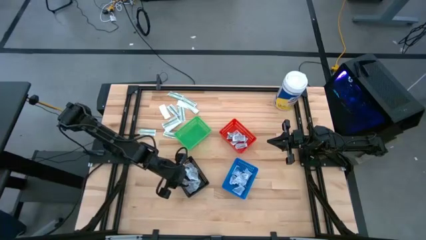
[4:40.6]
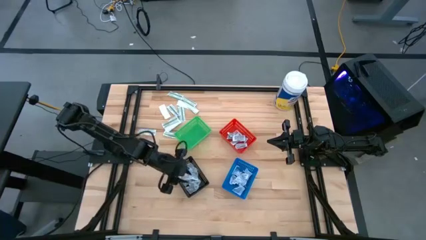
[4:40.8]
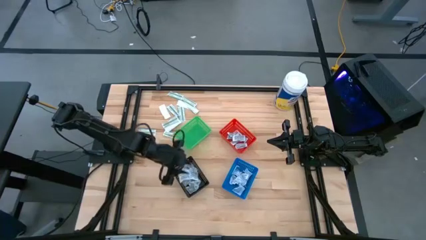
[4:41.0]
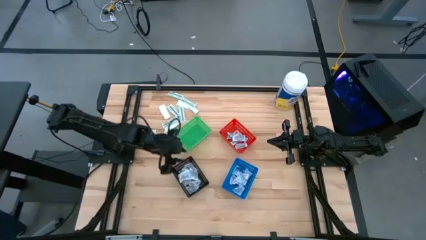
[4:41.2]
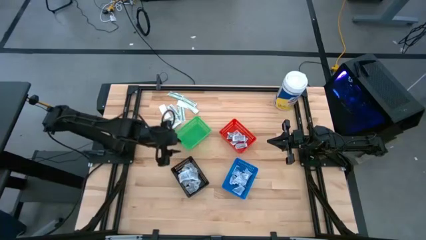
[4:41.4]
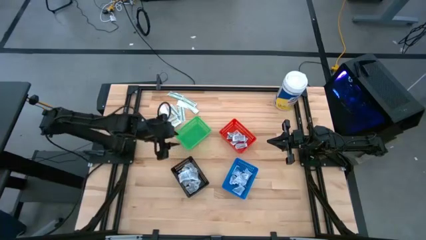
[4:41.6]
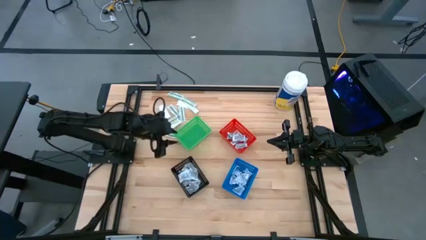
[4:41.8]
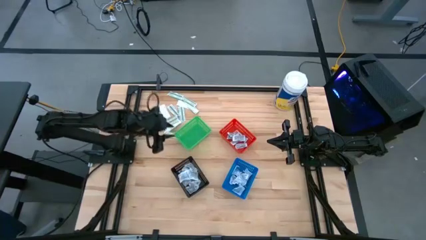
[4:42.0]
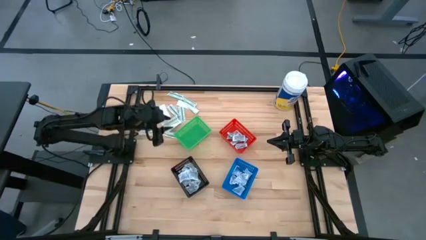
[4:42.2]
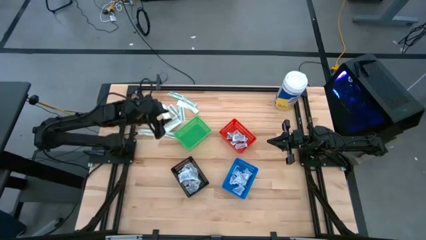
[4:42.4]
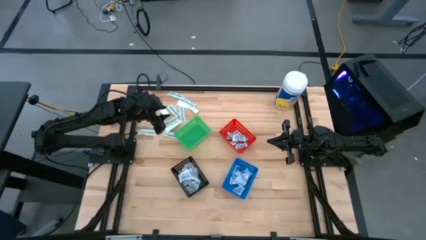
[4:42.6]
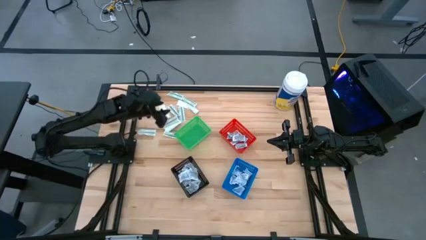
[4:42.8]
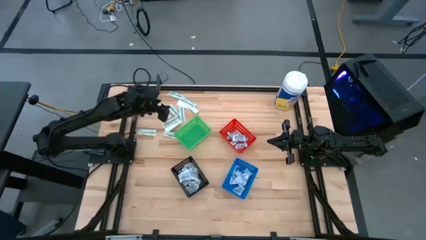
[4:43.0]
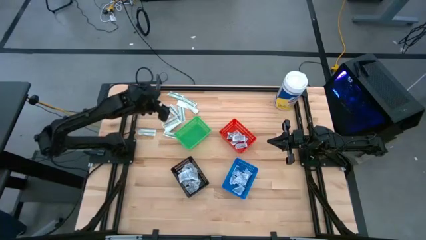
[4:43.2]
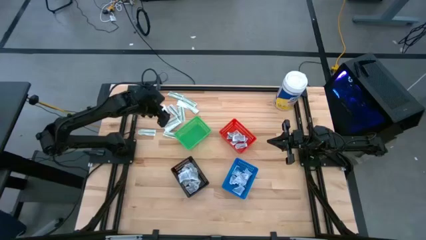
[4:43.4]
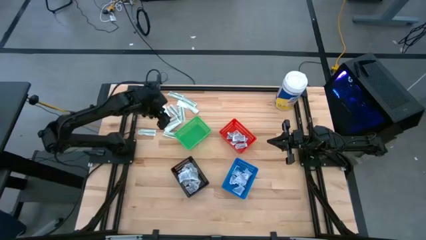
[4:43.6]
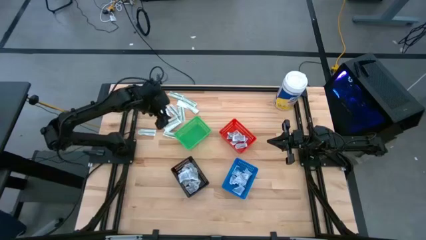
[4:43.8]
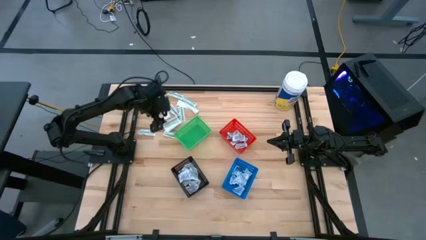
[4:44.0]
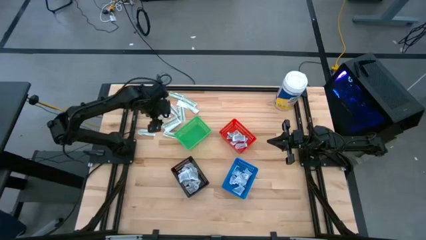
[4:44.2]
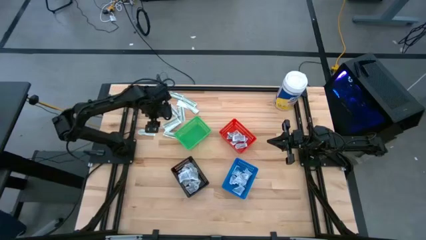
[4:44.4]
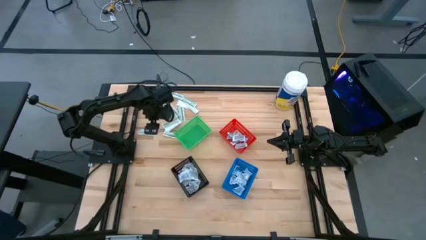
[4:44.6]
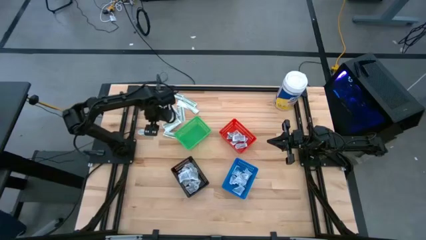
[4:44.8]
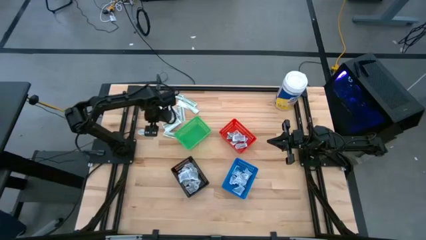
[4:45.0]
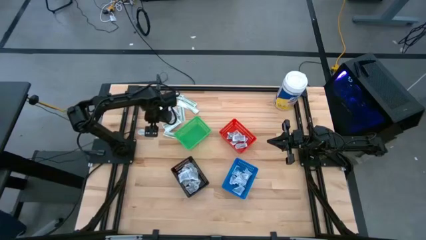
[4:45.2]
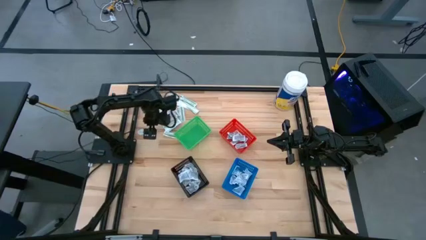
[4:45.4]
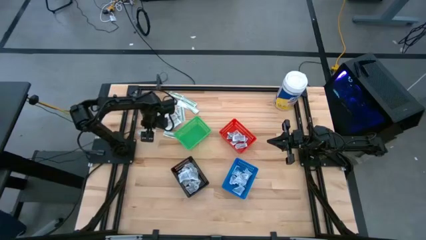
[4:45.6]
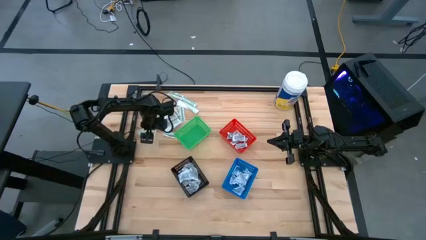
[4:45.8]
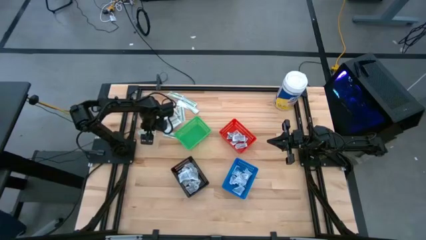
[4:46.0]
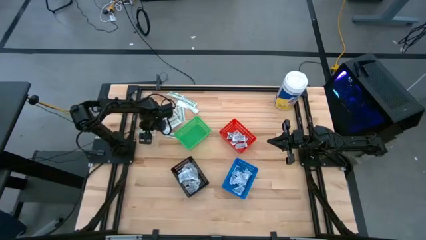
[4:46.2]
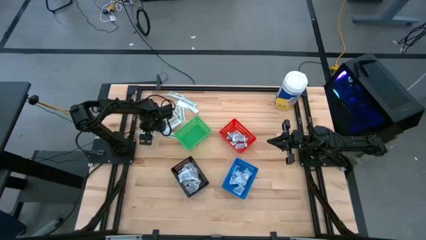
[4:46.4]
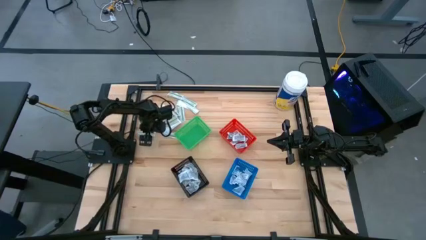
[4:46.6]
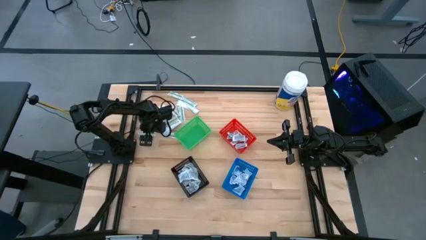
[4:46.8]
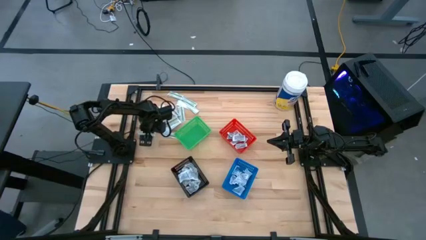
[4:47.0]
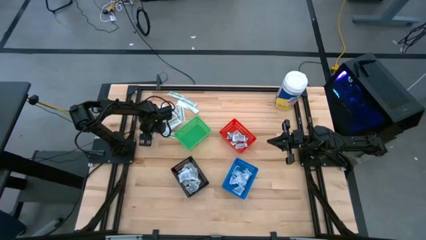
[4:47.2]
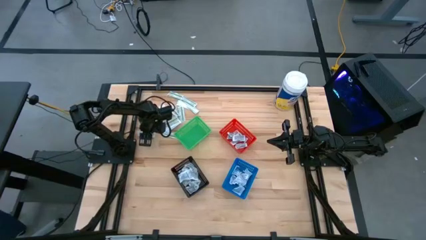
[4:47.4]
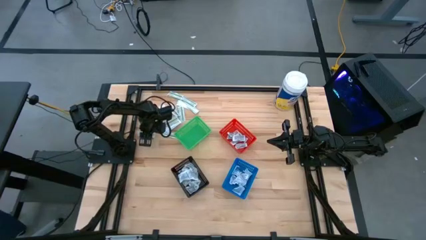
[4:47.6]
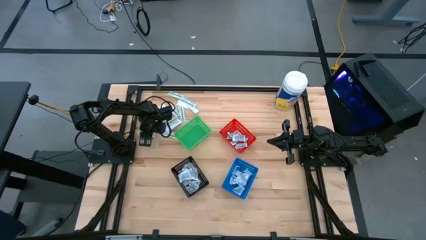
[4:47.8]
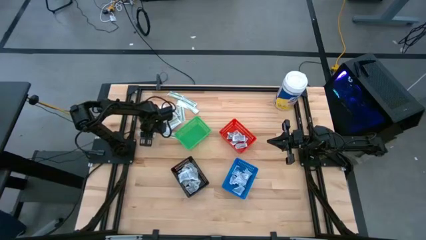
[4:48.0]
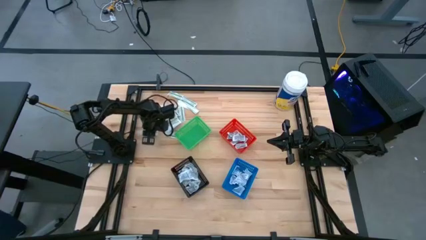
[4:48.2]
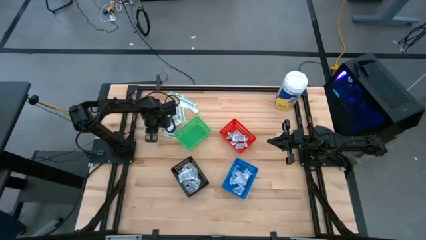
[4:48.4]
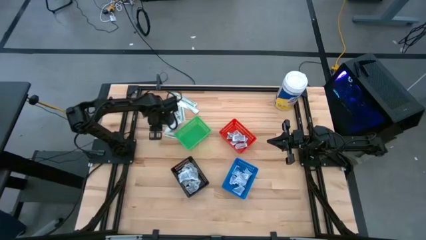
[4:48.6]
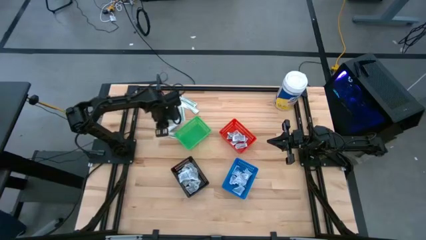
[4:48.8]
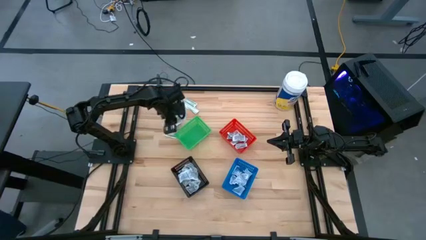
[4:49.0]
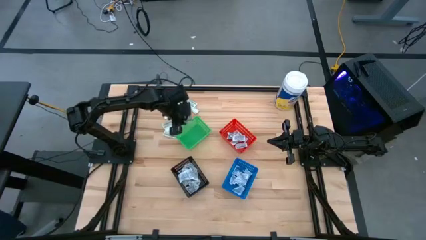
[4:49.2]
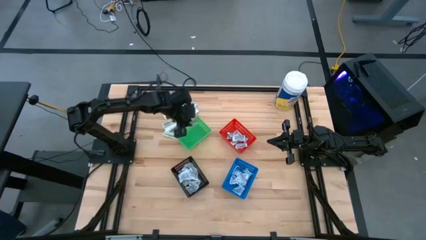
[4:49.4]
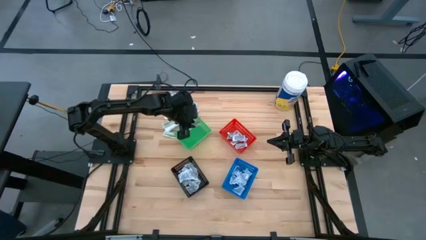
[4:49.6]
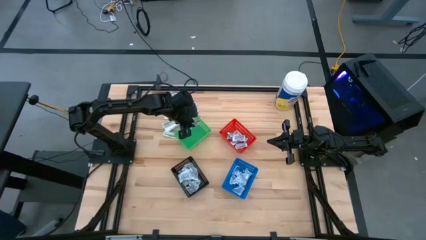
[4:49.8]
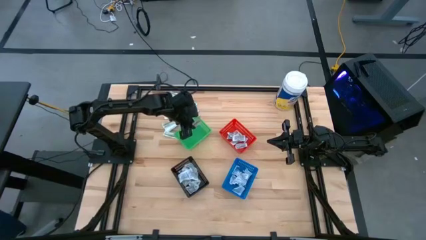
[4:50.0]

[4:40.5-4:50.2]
Task: Pick & Place First Aid Supplies
Put the green bandage pack into the green bin

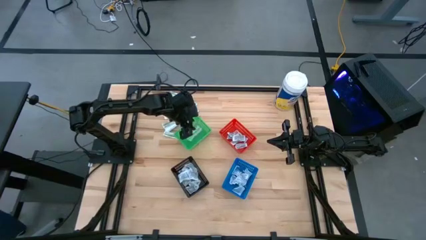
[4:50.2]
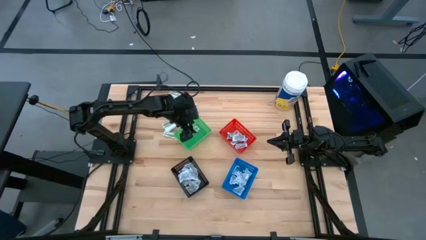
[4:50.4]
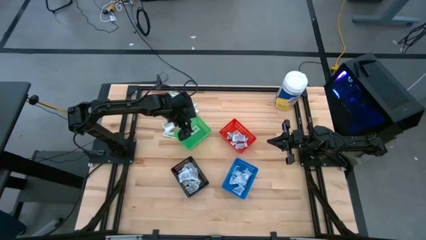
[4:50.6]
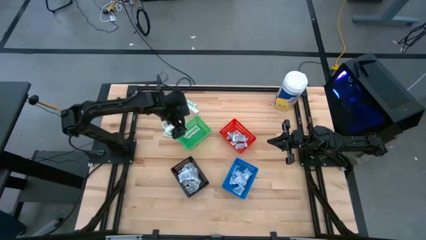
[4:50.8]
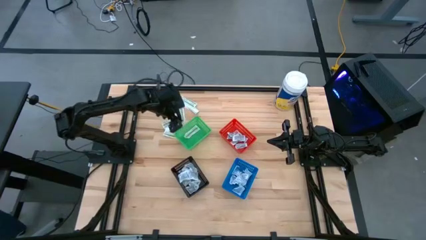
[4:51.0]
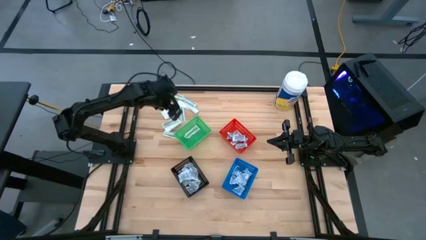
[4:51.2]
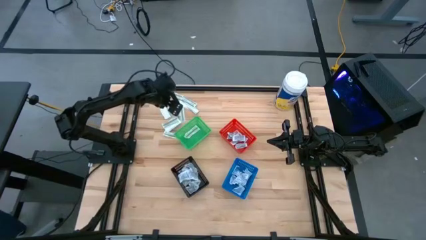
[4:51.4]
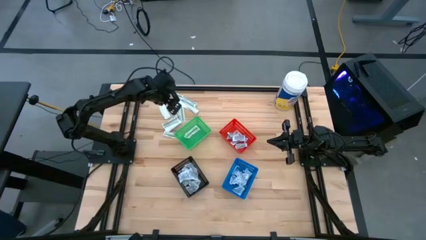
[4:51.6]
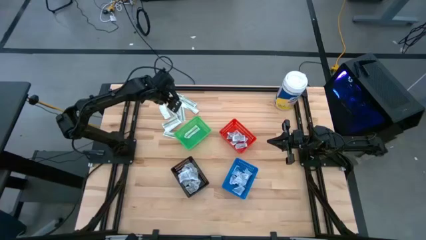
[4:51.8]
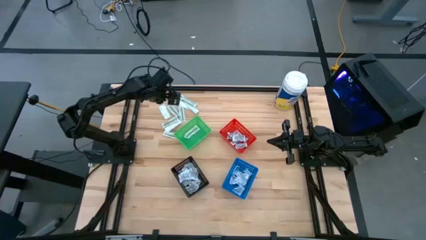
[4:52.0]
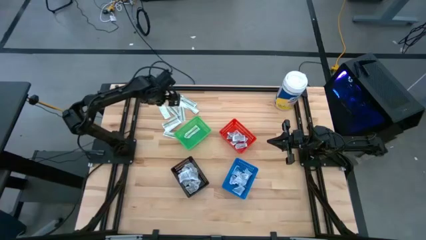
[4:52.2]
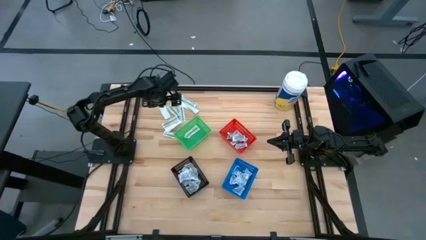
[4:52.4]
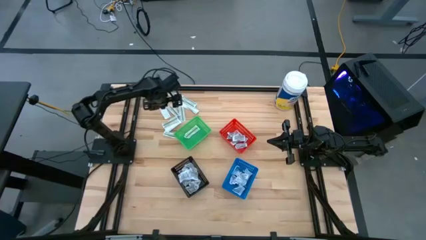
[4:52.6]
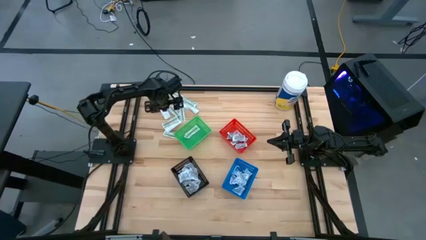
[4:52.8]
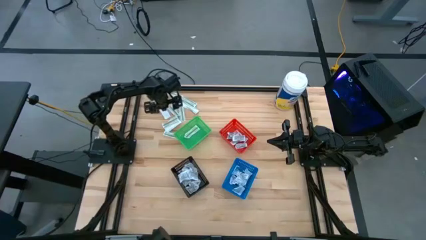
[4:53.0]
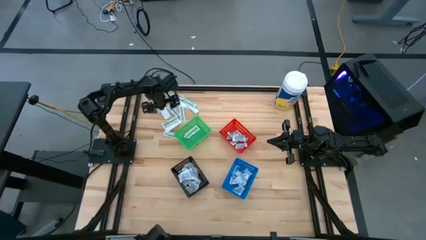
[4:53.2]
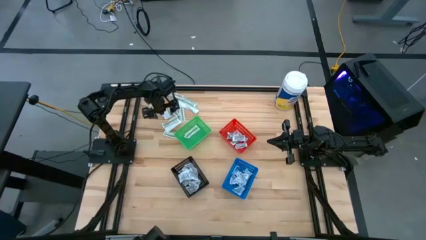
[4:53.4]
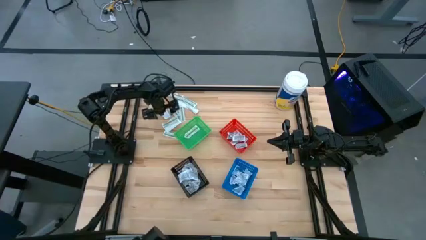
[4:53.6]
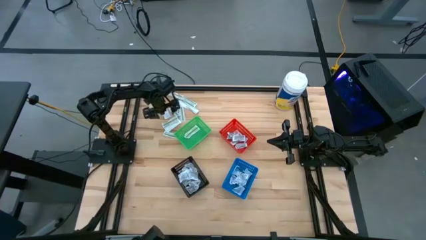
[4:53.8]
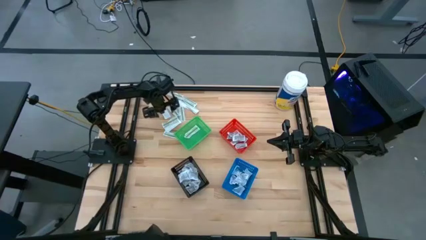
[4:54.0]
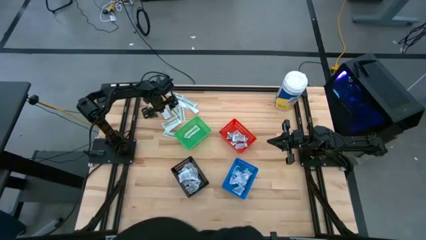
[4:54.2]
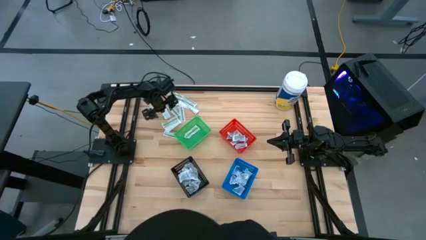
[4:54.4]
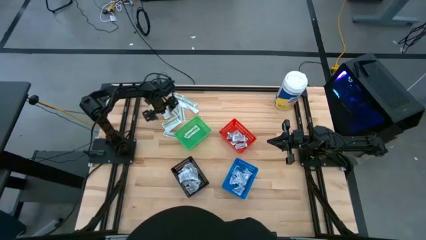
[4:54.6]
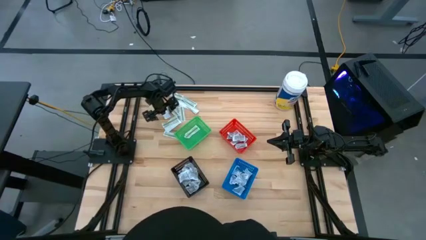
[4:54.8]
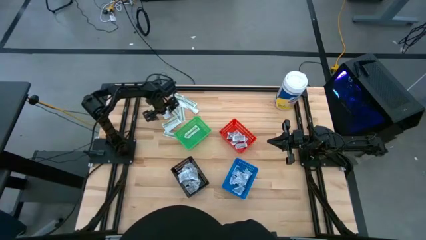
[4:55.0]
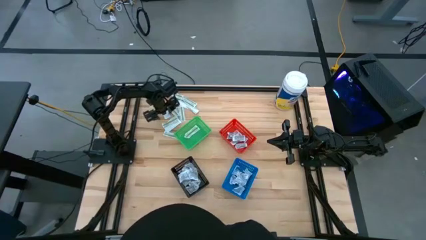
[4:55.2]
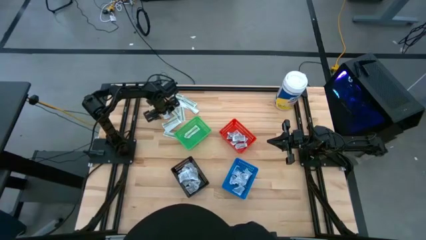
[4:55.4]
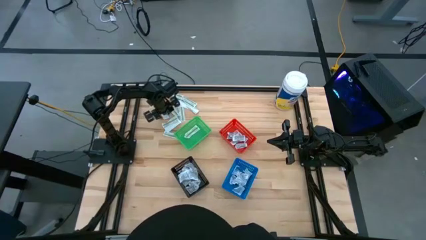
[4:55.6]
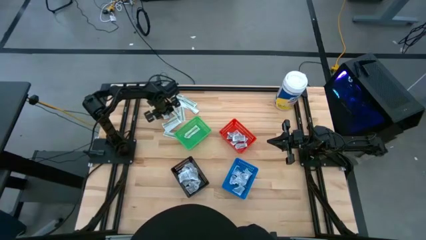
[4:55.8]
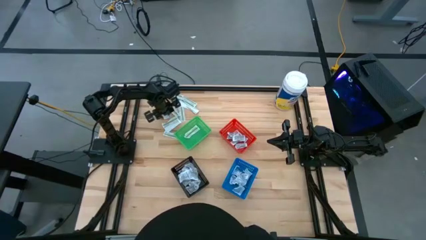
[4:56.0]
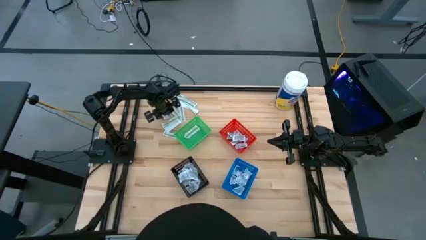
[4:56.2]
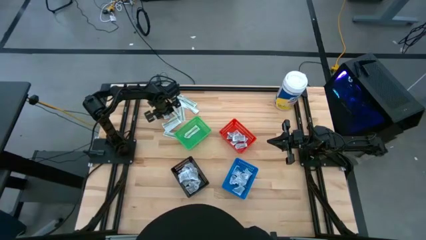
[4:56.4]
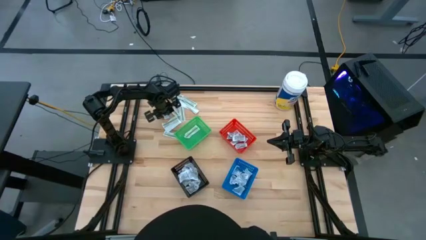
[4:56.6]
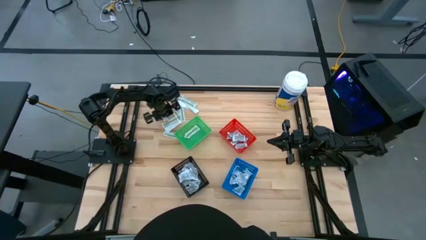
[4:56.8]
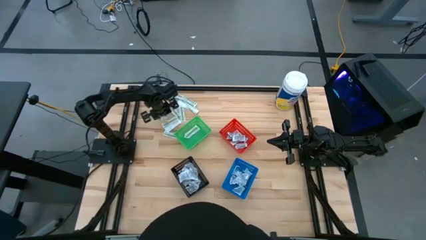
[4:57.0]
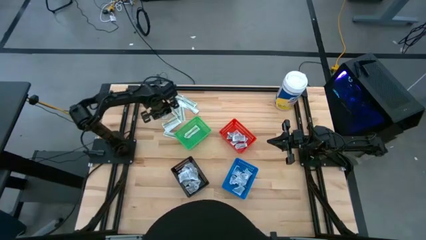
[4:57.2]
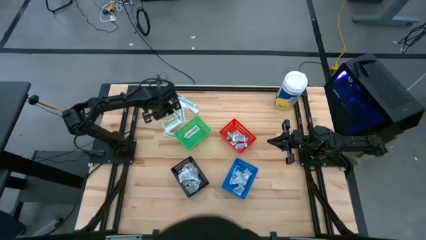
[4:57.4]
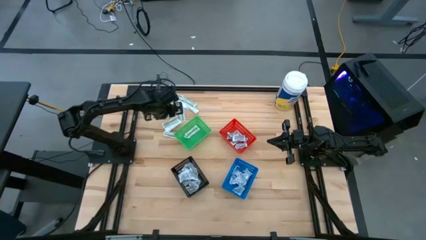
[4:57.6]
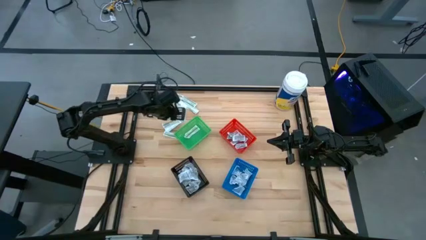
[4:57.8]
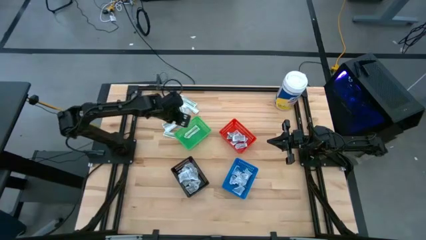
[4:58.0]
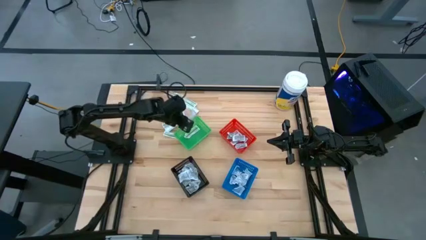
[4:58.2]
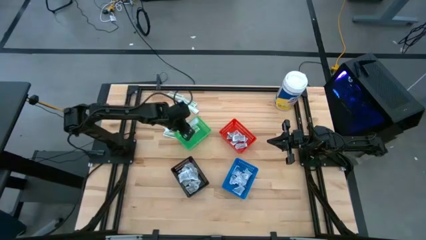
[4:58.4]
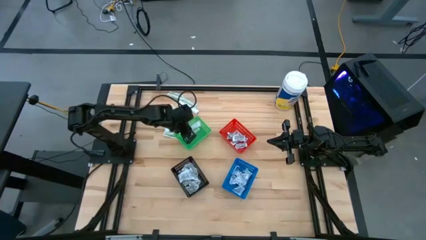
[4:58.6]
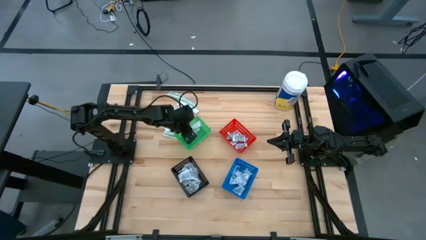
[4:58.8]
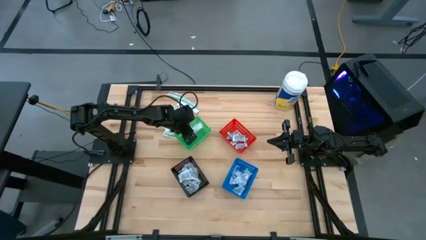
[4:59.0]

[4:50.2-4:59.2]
Put the green bandage pack into the green bin
